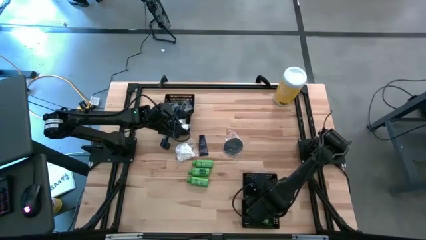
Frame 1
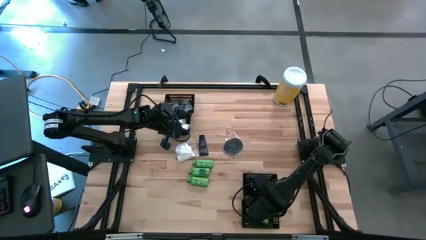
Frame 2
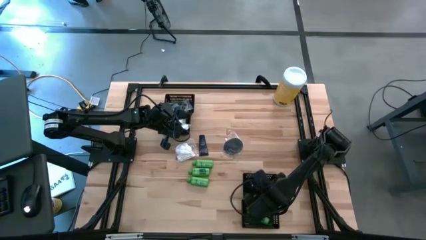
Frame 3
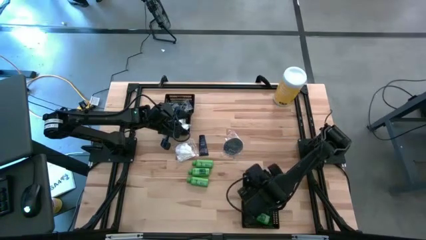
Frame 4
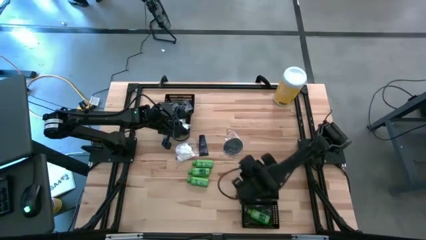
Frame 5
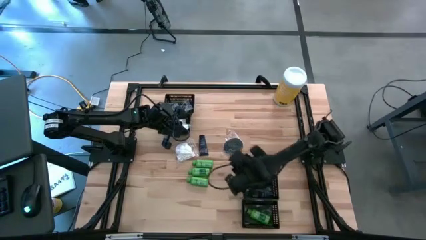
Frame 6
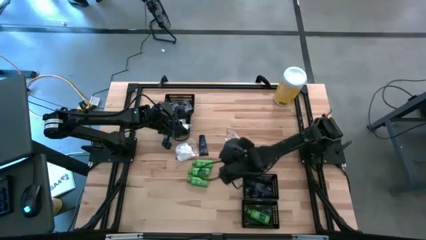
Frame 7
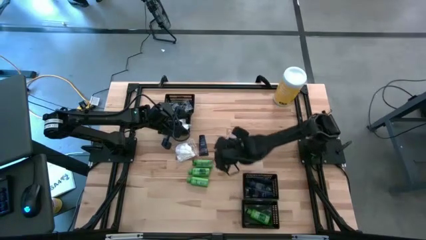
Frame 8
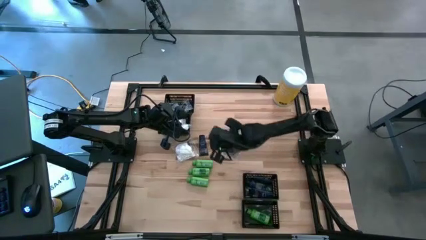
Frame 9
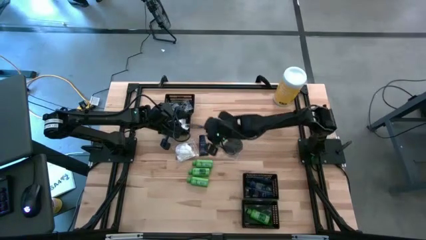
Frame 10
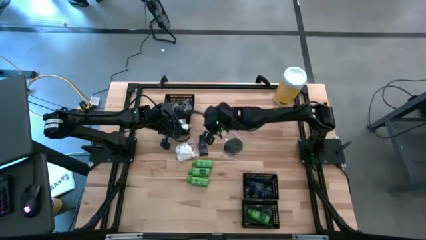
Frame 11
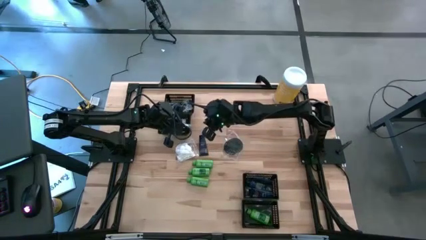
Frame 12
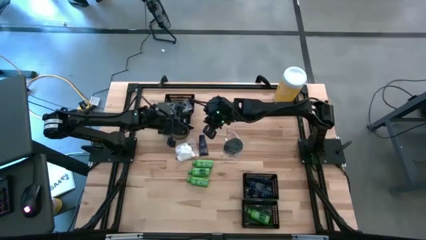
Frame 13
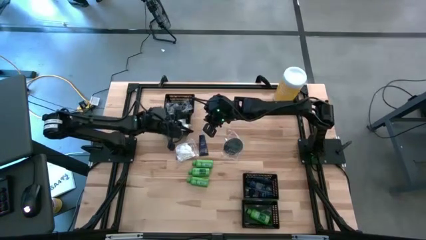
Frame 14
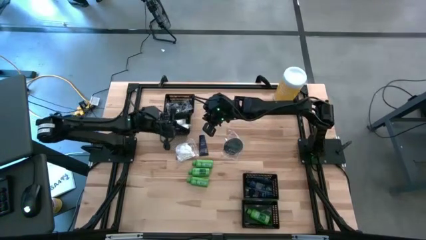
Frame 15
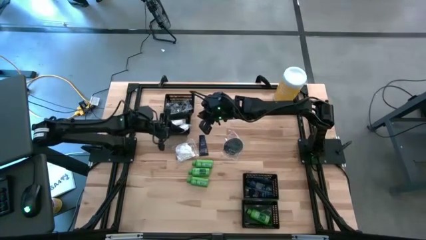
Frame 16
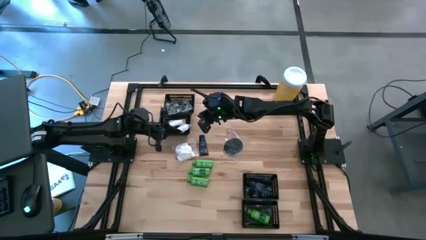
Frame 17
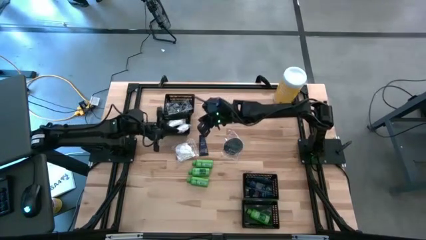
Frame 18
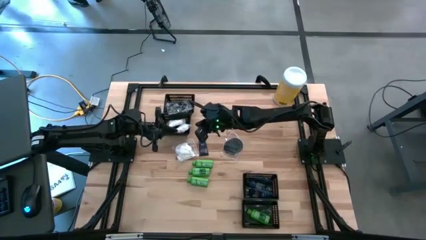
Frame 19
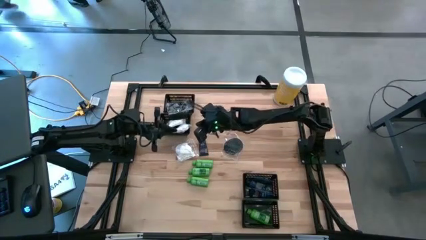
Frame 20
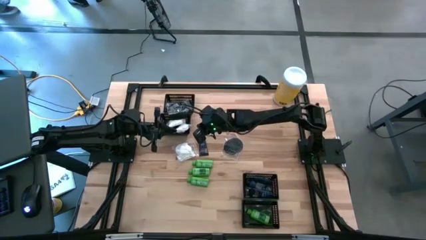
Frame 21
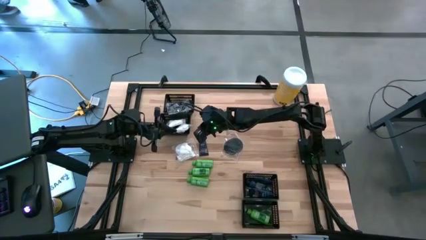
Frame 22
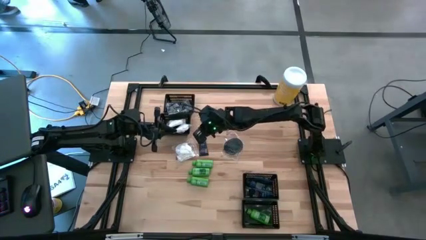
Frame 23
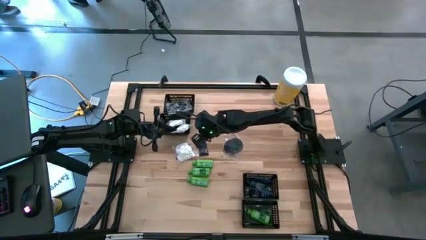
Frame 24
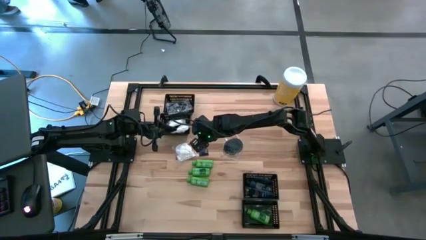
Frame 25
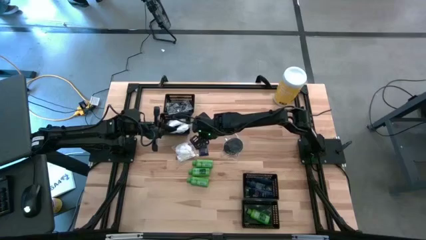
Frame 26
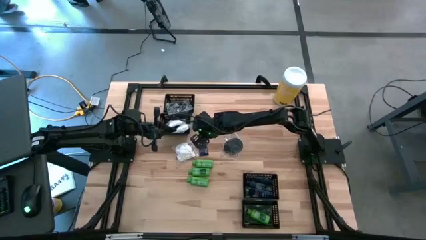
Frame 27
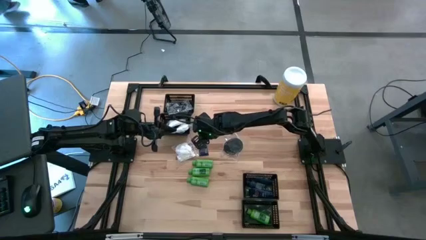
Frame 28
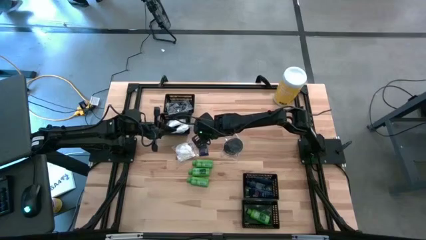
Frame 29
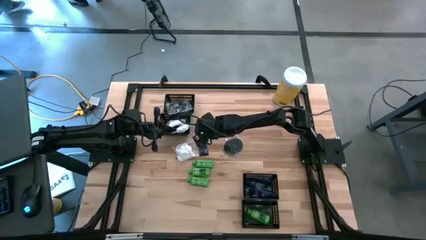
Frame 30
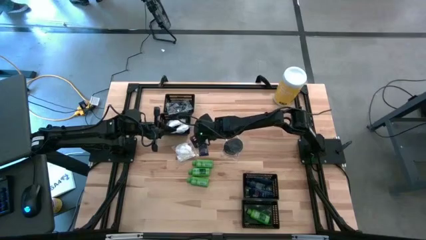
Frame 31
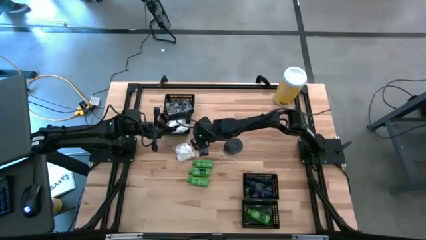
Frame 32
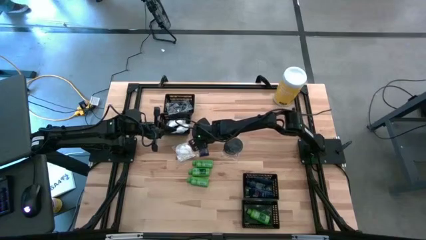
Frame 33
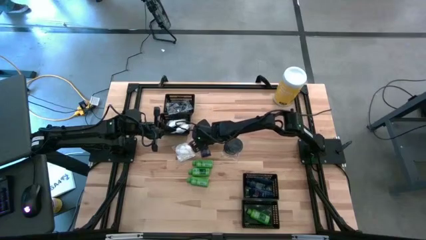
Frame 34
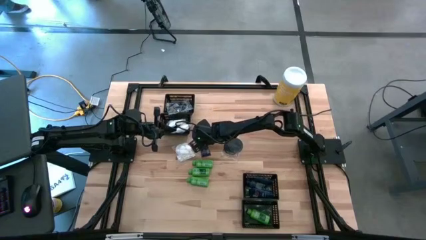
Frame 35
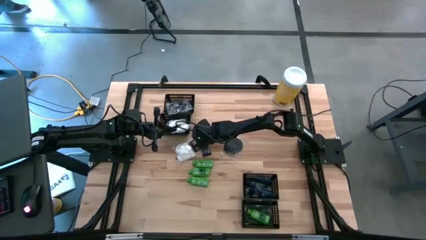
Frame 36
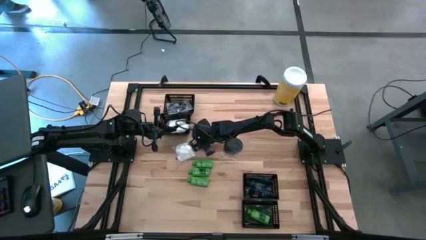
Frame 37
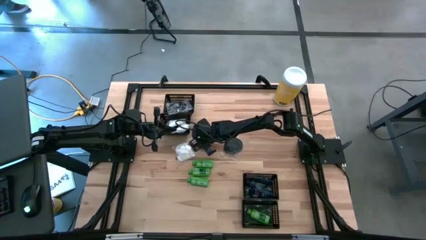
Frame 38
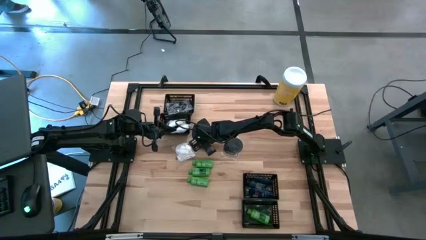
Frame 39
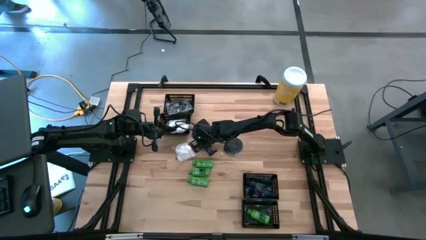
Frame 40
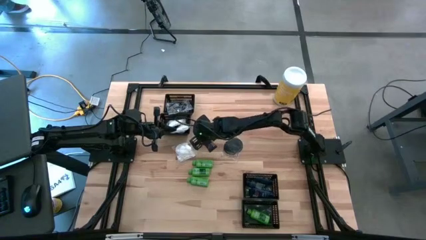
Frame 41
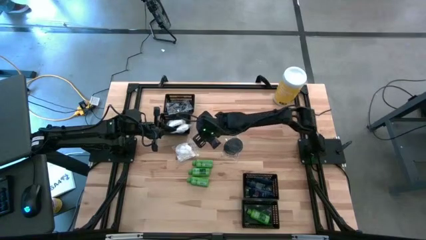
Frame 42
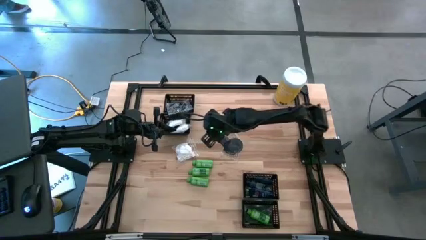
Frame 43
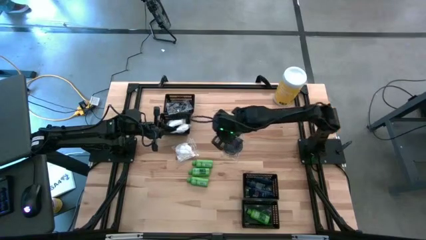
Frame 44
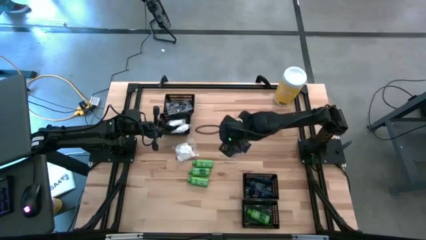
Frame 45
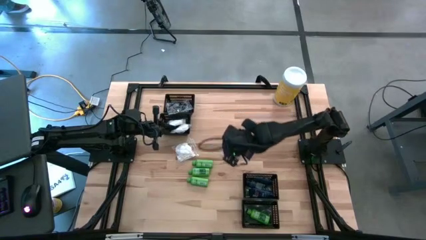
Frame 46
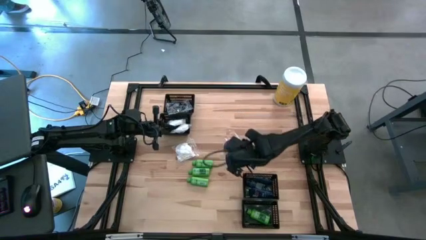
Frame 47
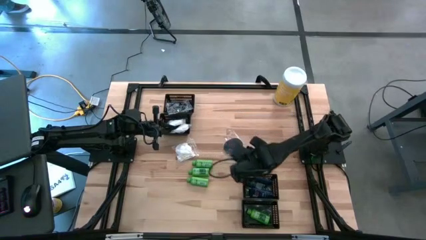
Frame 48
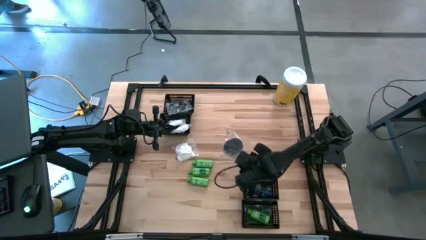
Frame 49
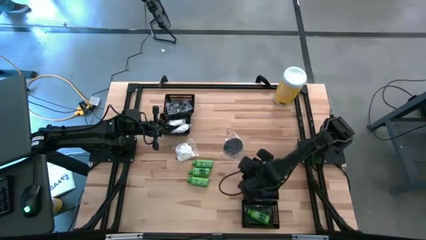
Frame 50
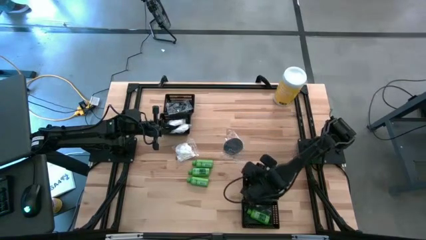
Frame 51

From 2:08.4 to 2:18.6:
Task: Pick & Place Travel size toiletries
Put the blue shave cream into the middle bottom black basket
